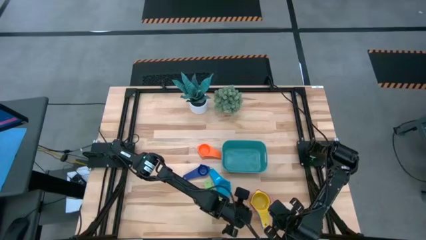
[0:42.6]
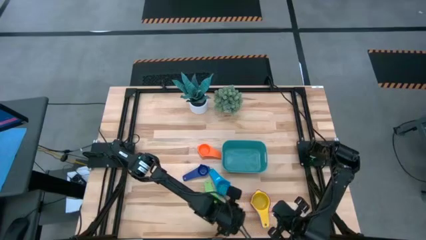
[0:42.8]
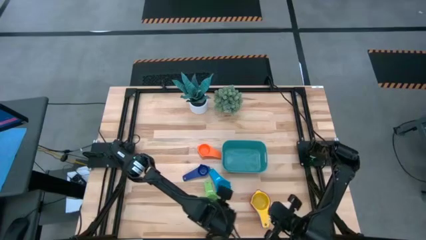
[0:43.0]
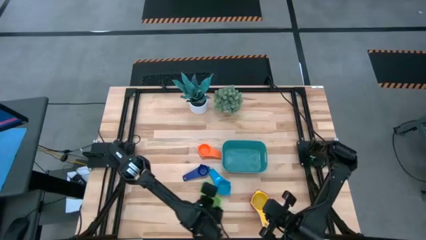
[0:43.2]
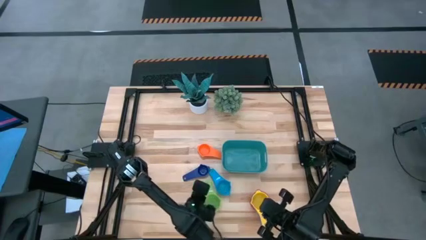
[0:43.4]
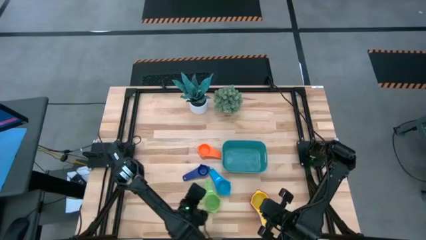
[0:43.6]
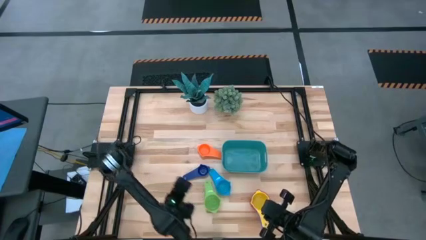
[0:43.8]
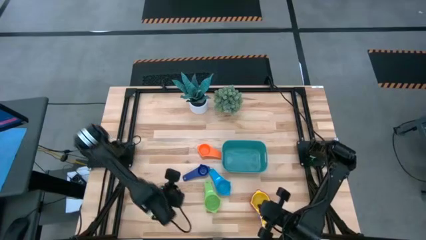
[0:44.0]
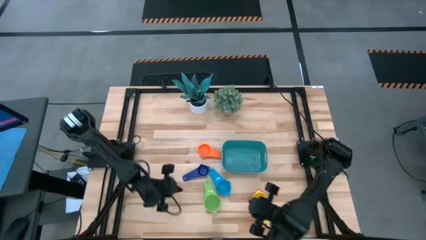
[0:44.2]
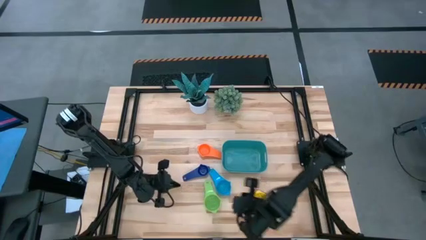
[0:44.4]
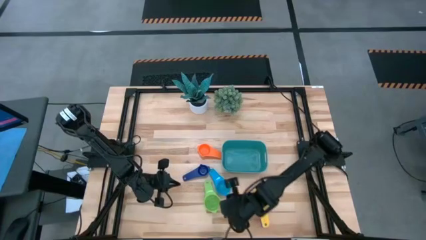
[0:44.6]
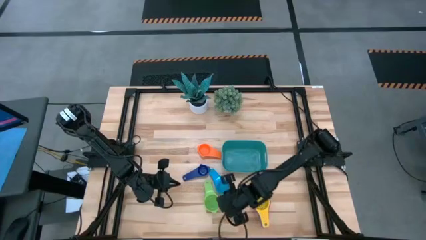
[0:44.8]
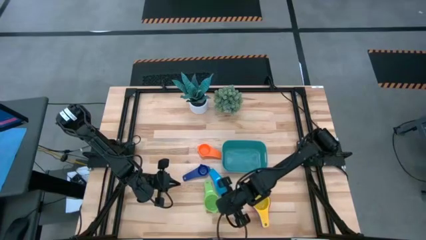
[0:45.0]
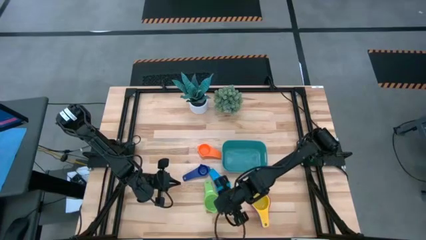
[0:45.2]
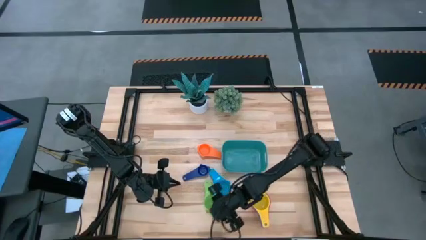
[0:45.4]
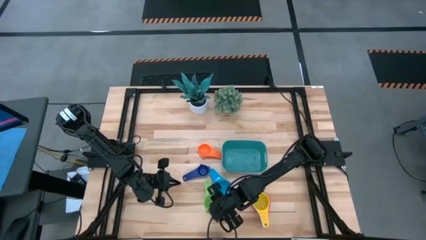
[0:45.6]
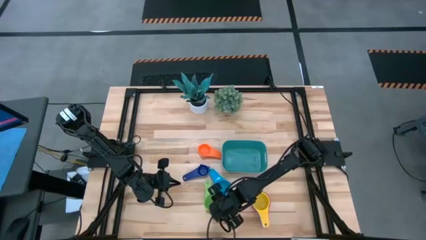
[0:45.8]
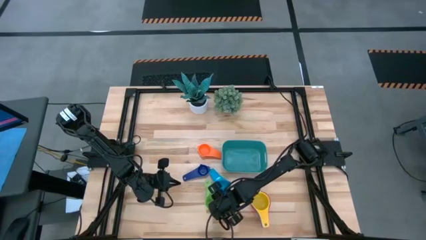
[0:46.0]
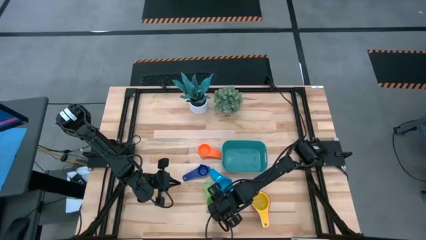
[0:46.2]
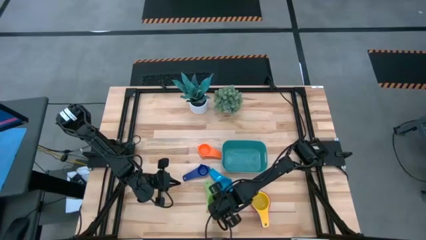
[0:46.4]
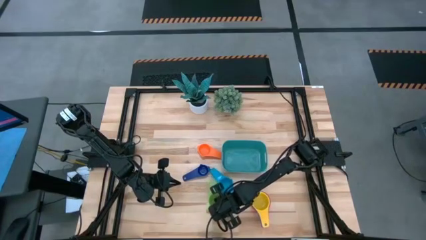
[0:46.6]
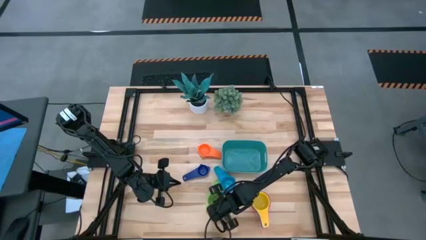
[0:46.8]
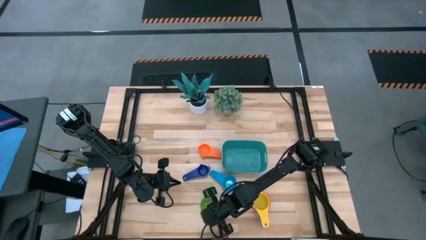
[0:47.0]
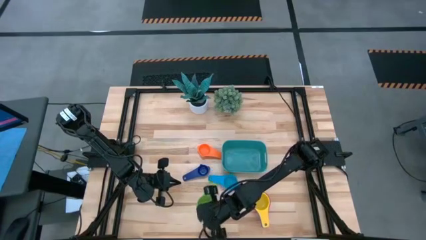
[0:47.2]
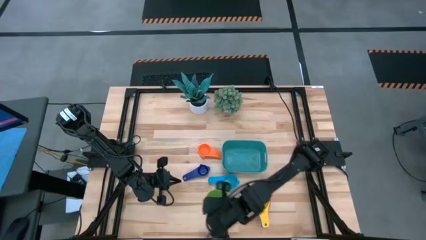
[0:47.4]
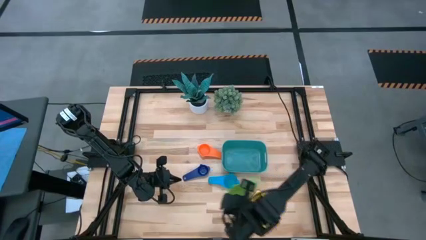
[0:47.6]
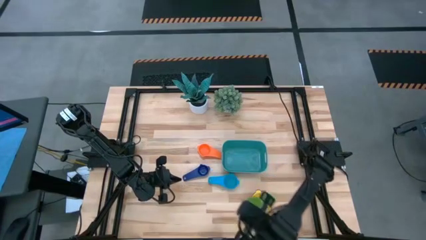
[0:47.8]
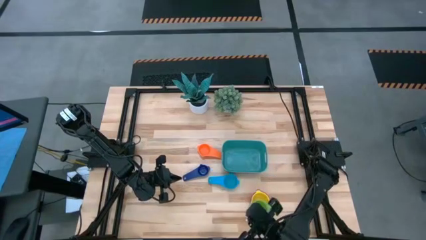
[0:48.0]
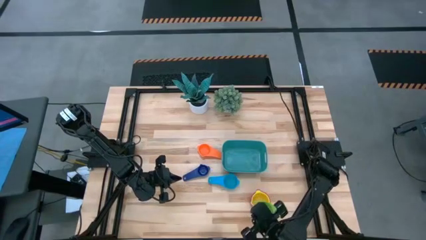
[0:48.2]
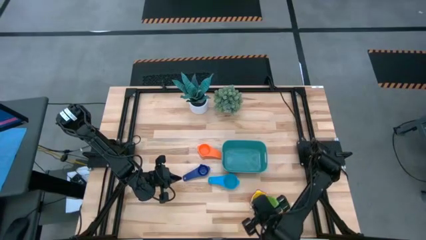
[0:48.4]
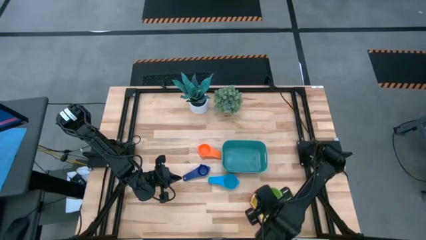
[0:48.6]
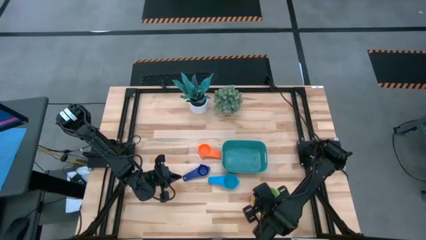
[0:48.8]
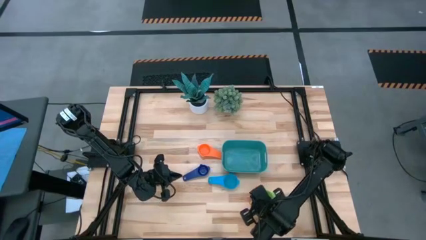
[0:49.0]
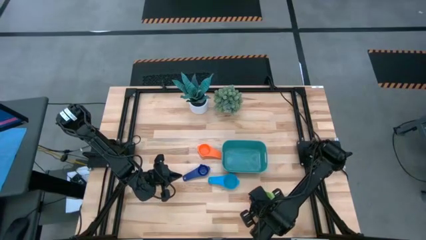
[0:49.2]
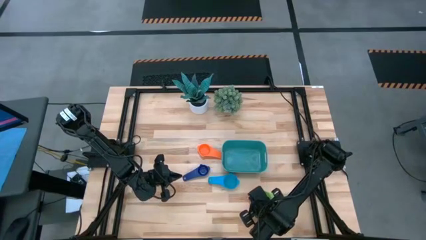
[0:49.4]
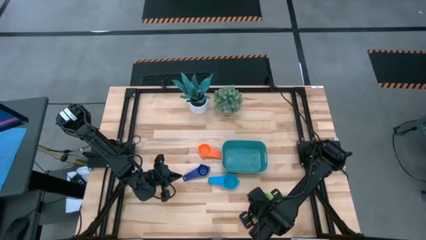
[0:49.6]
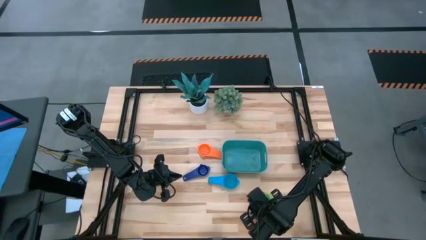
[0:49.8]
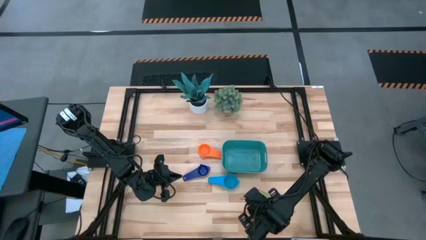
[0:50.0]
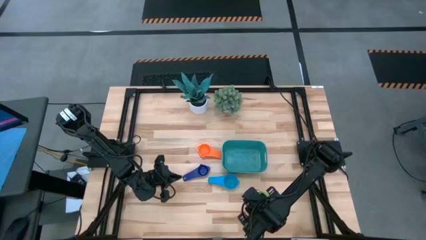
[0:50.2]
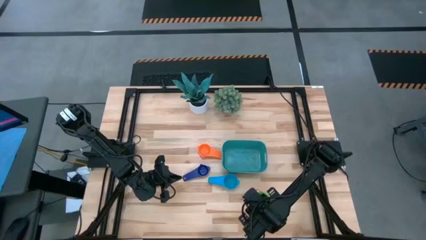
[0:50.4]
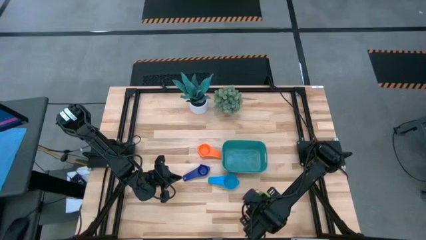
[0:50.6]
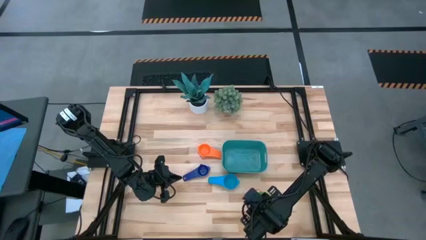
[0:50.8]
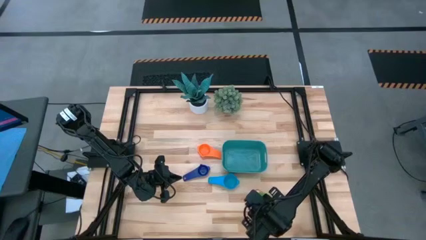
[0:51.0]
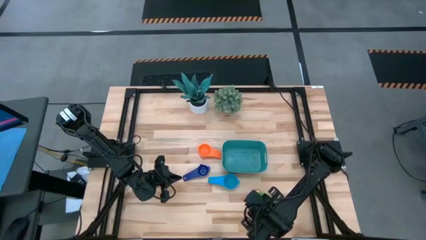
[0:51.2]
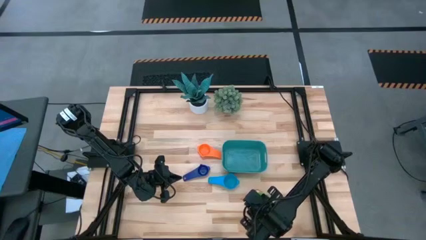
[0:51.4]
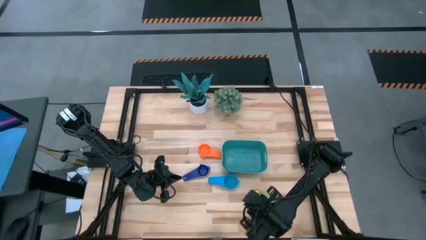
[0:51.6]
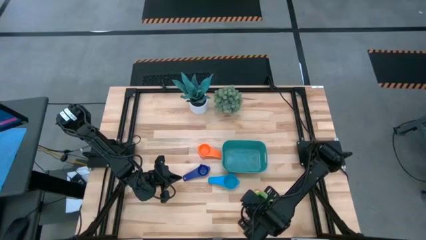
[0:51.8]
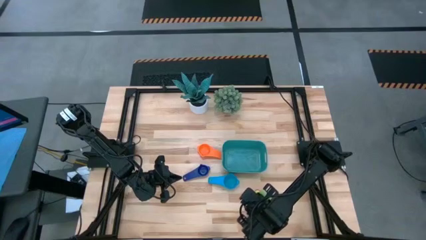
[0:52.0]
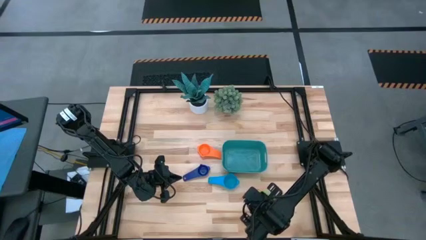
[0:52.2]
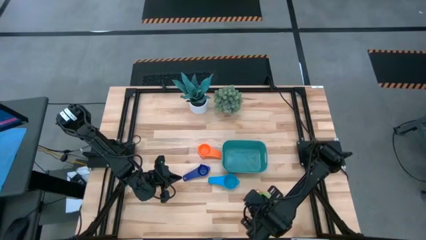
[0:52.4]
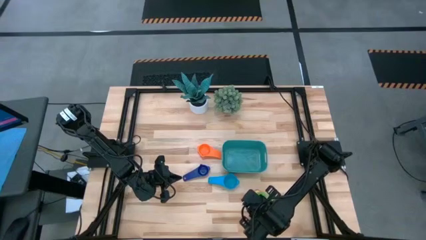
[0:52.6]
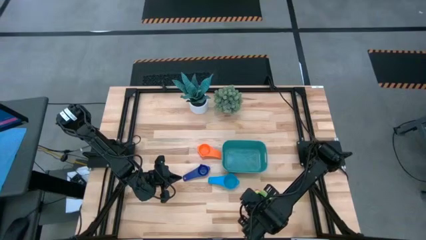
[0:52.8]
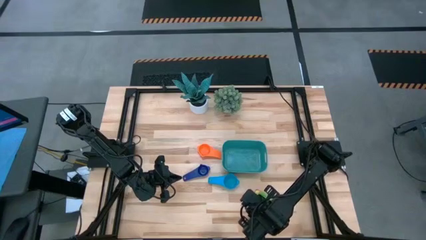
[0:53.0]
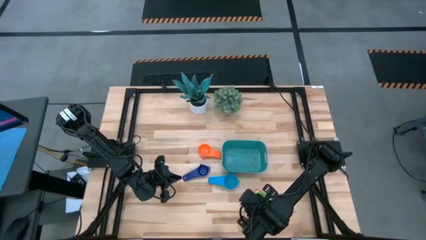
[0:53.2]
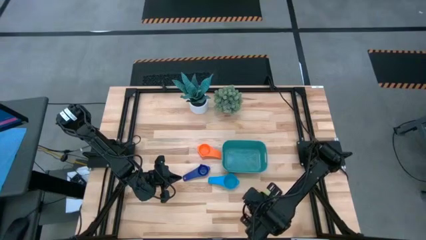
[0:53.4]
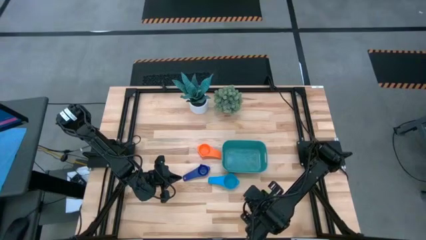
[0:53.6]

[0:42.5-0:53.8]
Task: Nest measuring cups in basket
Stack the green measuring cup on top of the yellow measuring cup

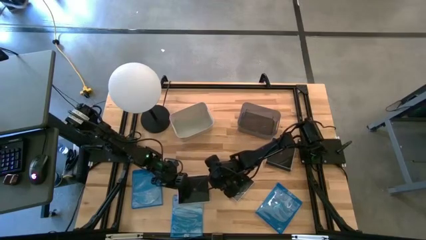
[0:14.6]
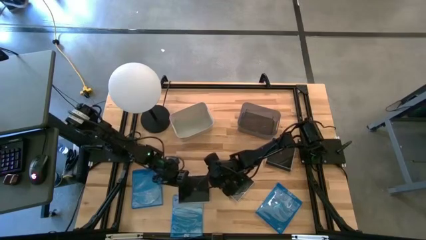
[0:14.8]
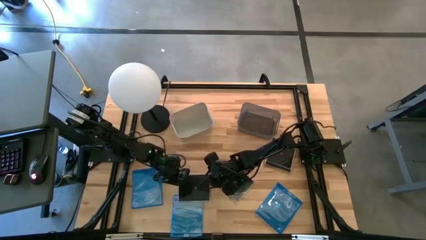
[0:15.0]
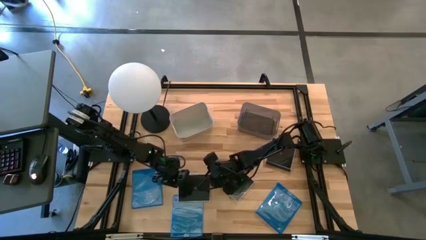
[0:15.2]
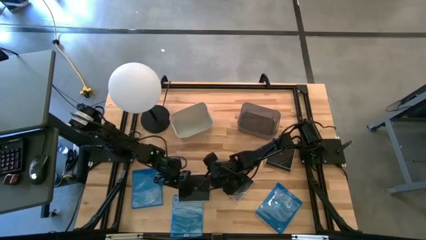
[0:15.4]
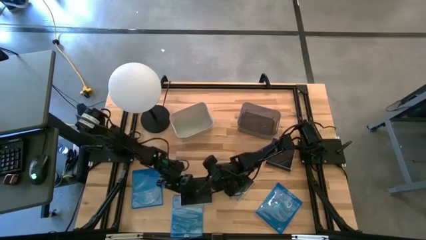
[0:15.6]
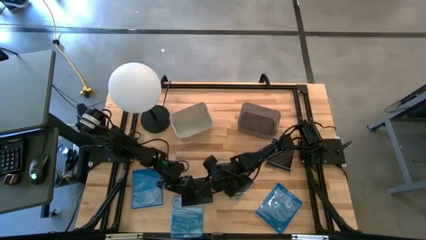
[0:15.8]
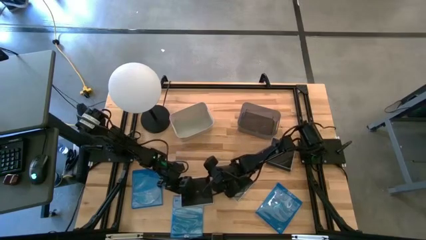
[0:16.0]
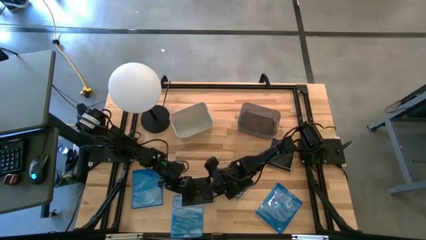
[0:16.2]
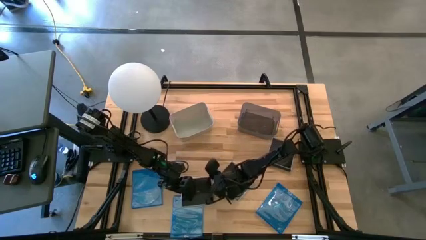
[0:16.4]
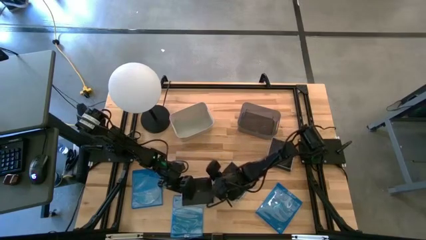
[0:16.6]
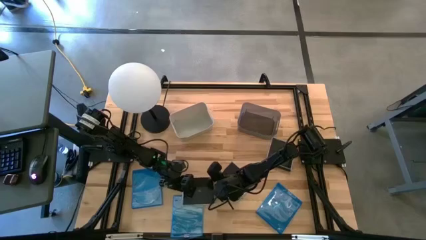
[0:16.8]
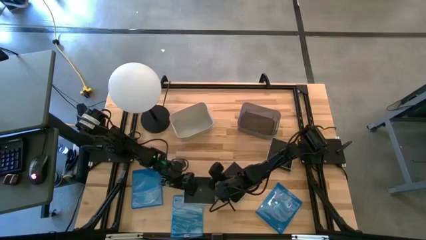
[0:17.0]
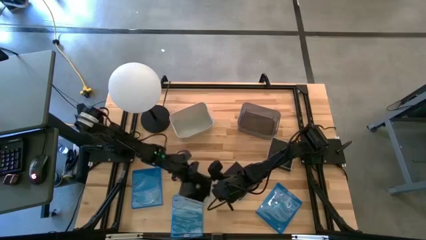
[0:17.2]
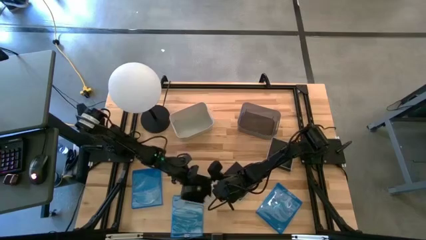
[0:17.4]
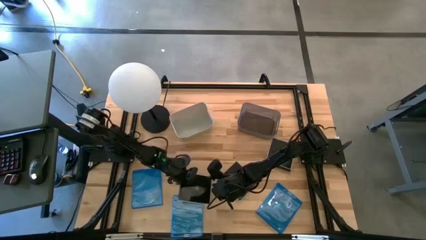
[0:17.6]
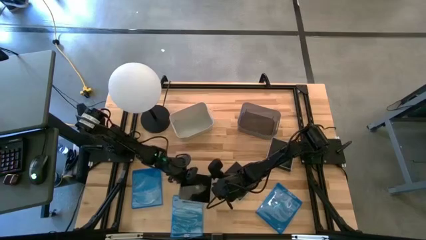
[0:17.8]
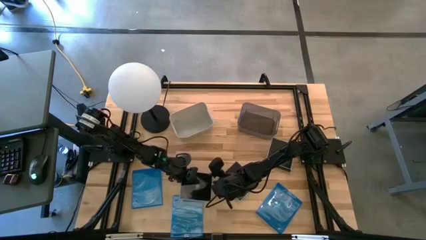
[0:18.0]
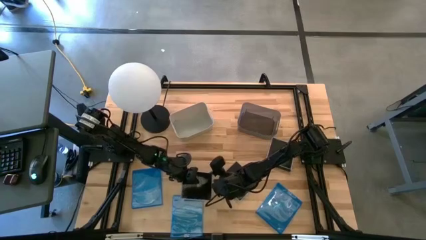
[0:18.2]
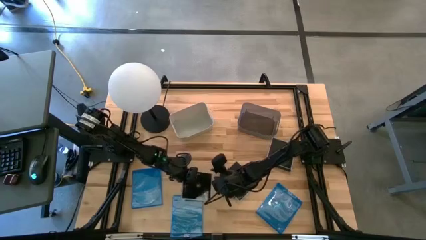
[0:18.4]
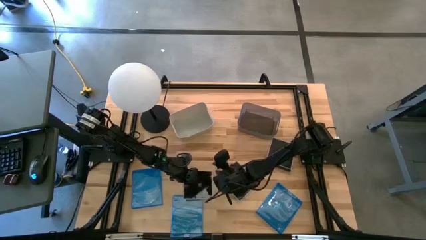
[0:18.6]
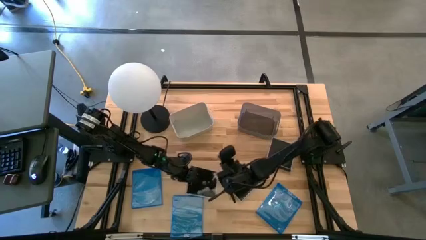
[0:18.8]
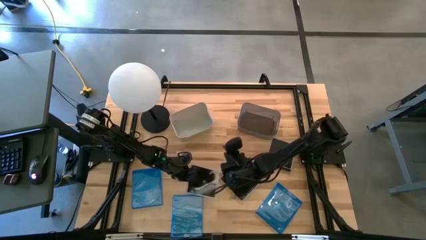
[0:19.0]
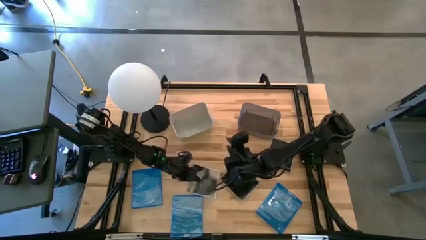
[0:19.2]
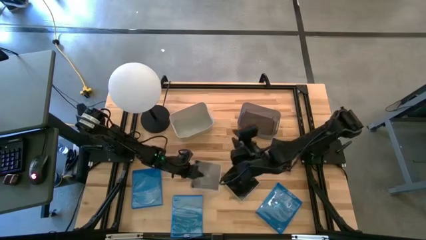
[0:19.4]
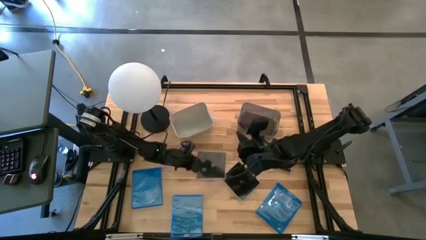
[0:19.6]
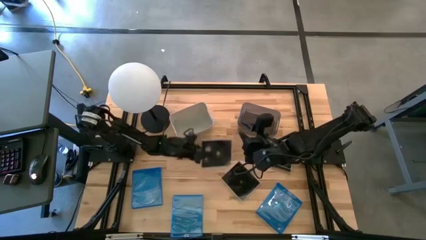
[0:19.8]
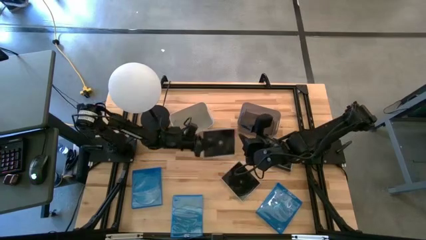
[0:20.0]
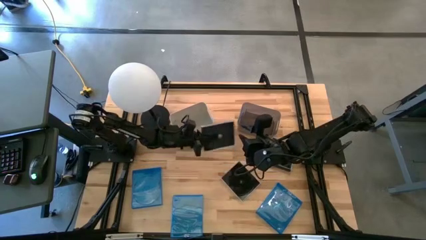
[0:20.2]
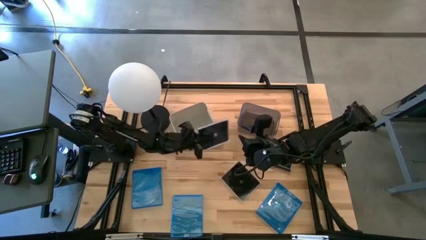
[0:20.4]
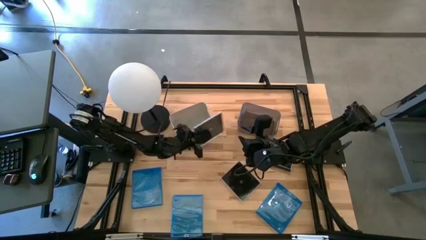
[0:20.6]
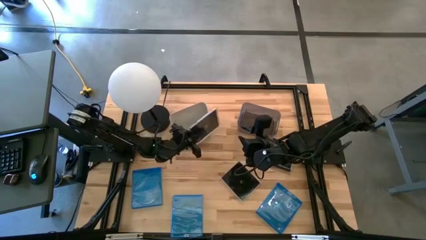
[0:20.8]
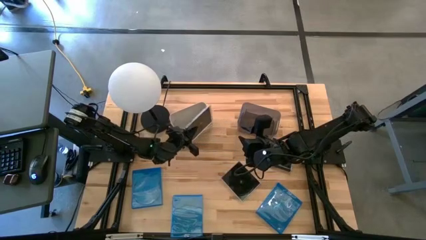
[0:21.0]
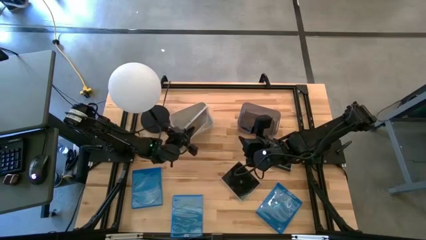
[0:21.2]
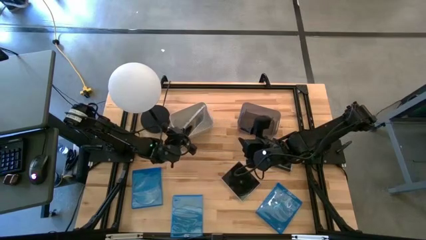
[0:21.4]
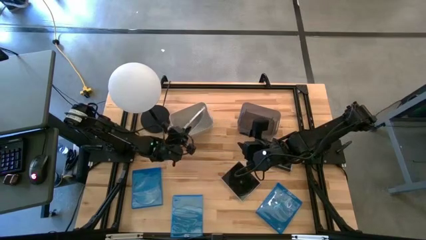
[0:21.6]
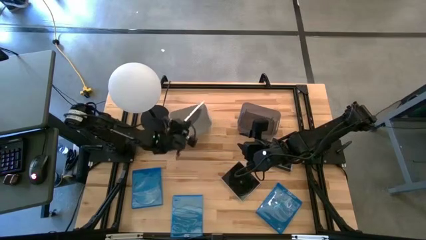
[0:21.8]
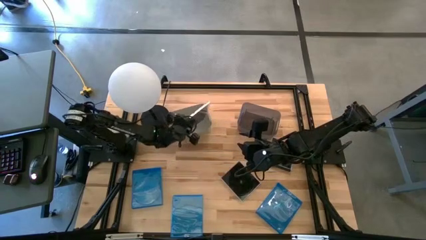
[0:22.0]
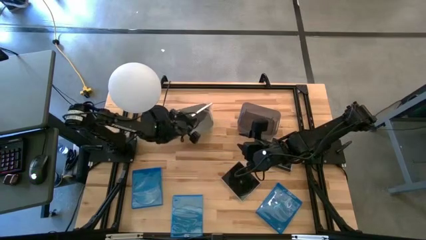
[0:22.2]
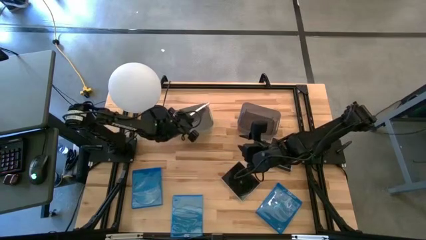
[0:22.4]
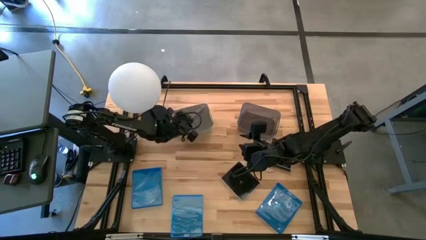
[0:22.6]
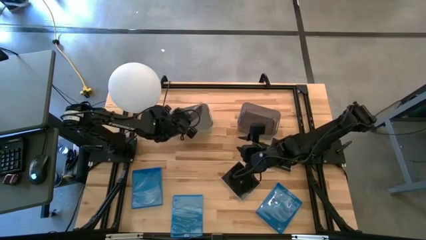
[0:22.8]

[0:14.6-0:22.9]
Task: Pick & place jewel cases by type
Put the bottom left black CD case into the gray bin
